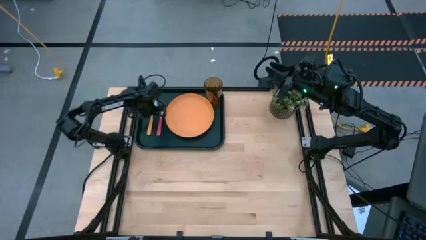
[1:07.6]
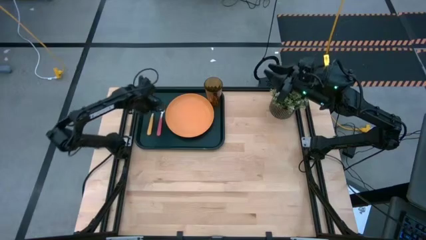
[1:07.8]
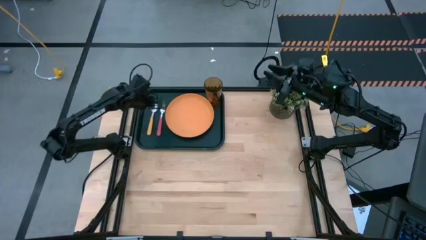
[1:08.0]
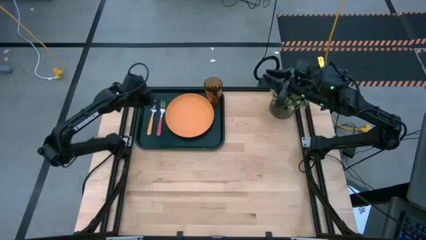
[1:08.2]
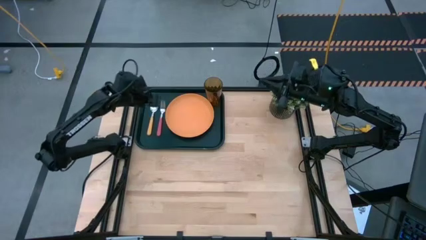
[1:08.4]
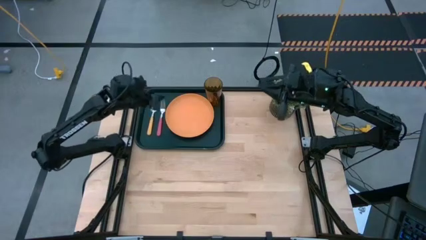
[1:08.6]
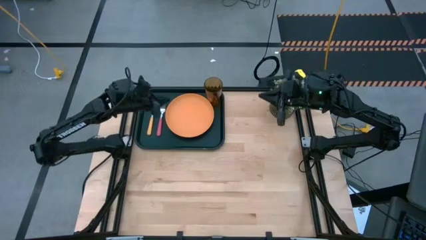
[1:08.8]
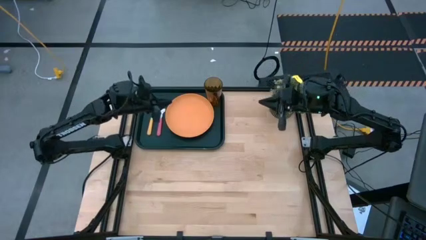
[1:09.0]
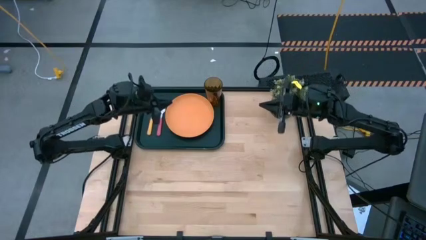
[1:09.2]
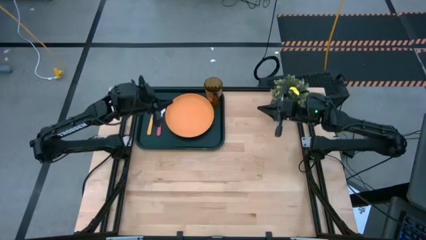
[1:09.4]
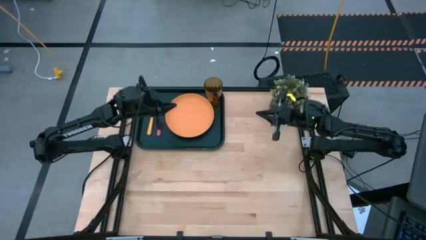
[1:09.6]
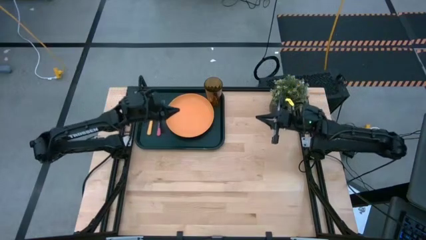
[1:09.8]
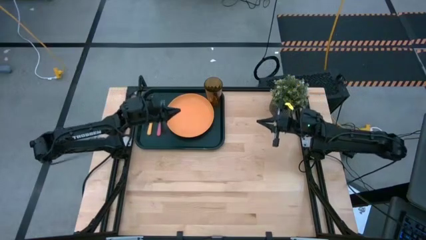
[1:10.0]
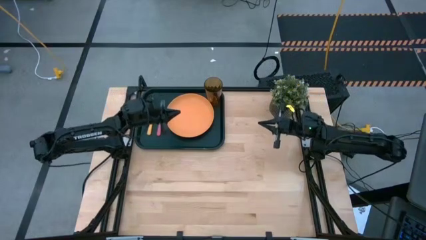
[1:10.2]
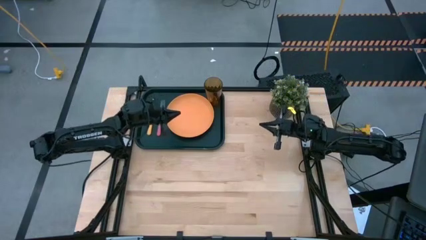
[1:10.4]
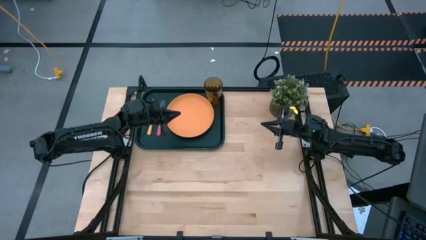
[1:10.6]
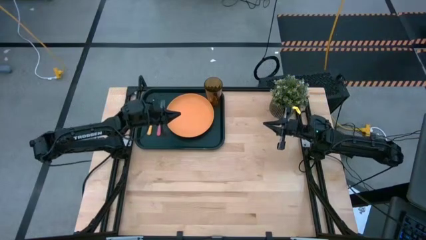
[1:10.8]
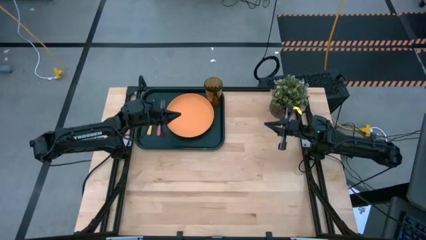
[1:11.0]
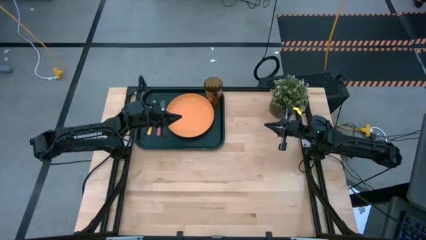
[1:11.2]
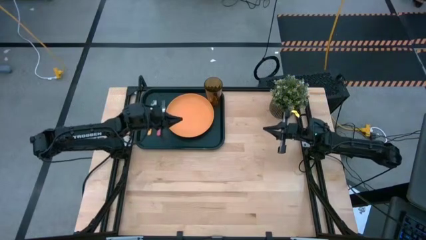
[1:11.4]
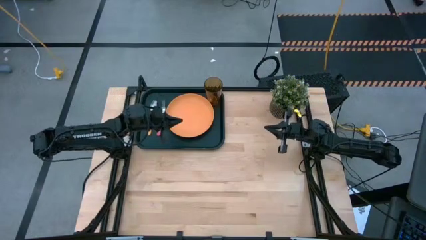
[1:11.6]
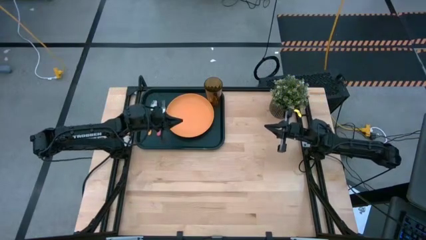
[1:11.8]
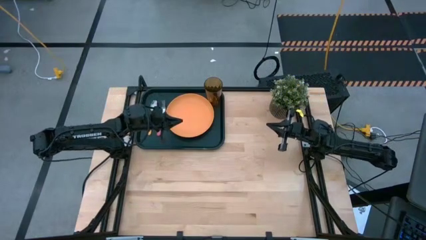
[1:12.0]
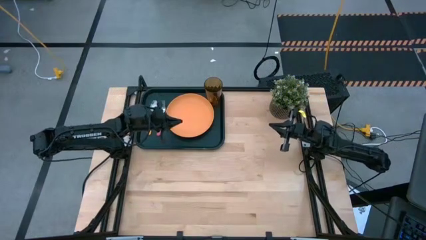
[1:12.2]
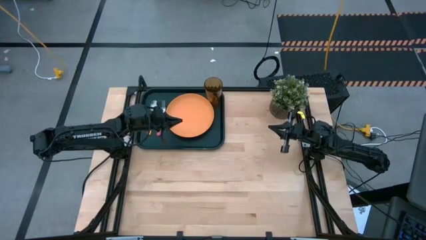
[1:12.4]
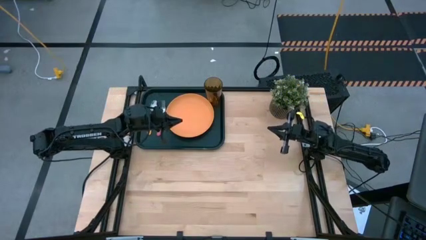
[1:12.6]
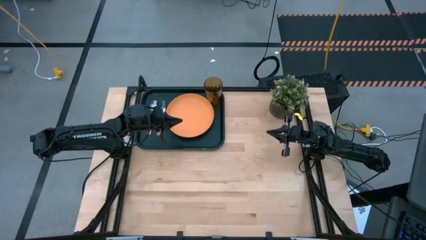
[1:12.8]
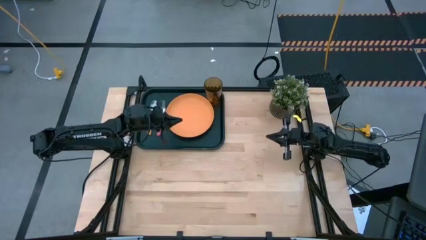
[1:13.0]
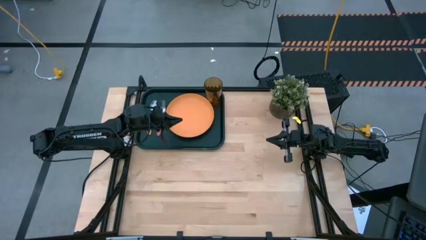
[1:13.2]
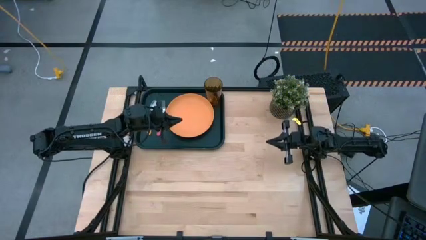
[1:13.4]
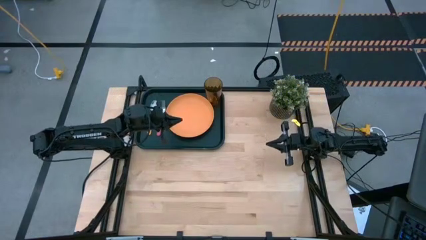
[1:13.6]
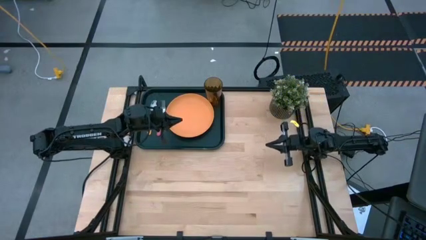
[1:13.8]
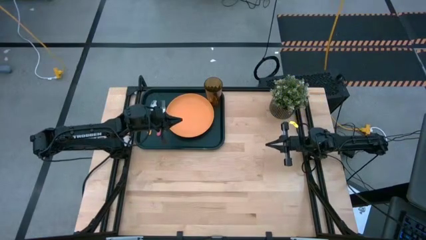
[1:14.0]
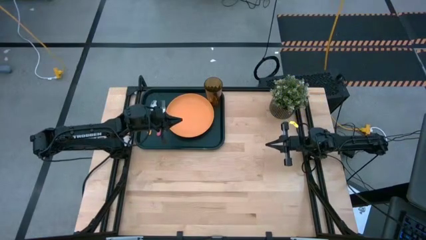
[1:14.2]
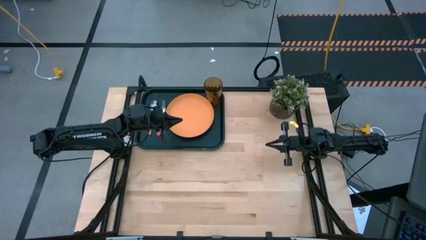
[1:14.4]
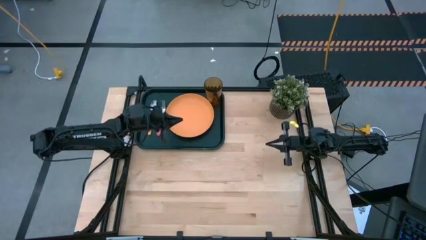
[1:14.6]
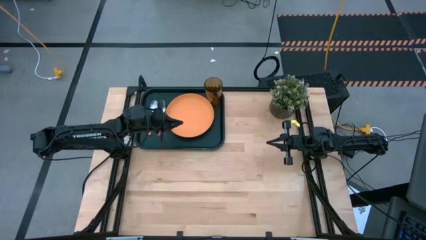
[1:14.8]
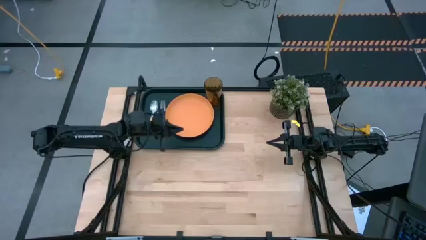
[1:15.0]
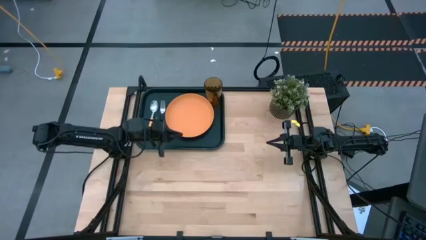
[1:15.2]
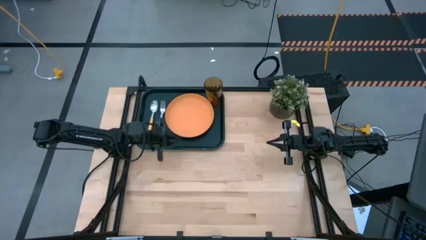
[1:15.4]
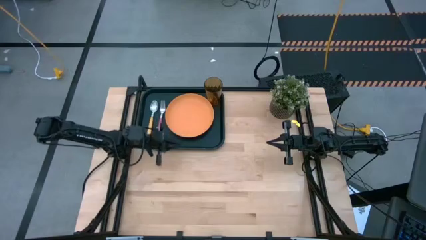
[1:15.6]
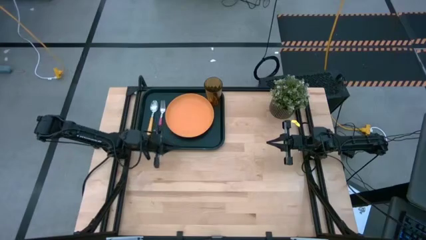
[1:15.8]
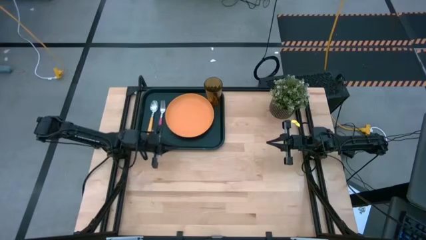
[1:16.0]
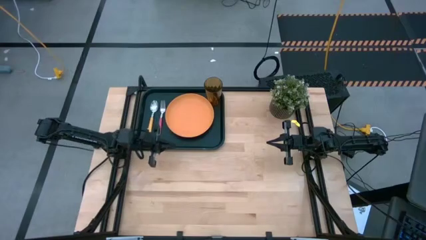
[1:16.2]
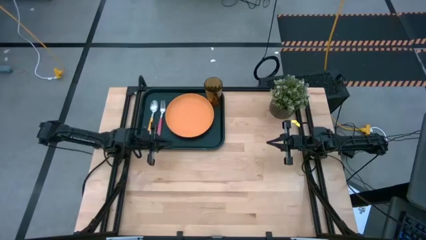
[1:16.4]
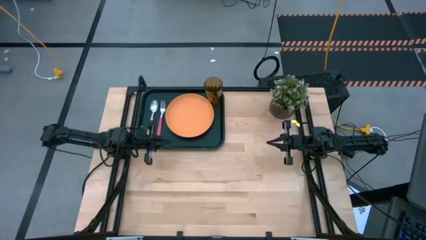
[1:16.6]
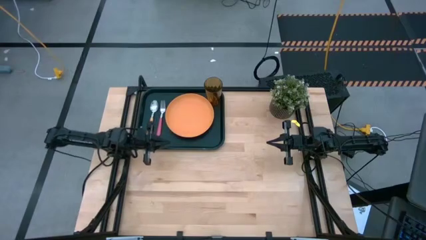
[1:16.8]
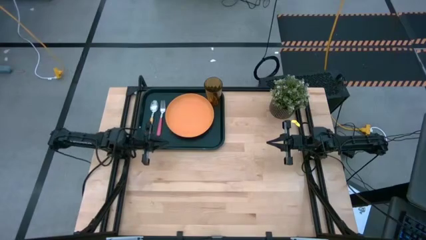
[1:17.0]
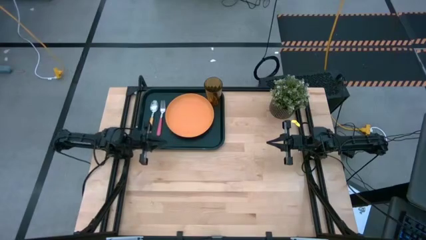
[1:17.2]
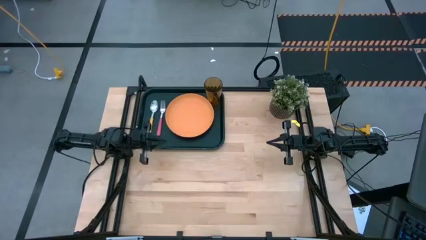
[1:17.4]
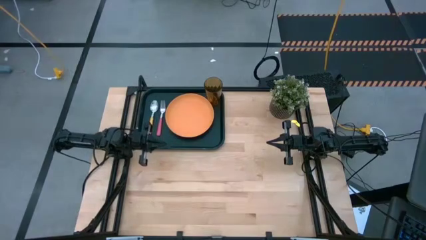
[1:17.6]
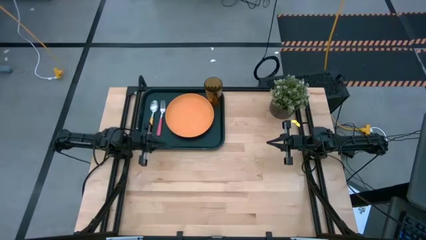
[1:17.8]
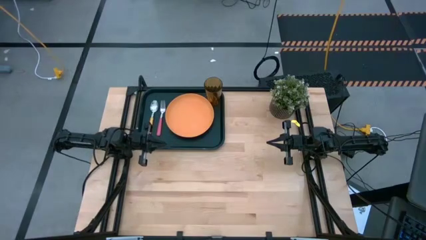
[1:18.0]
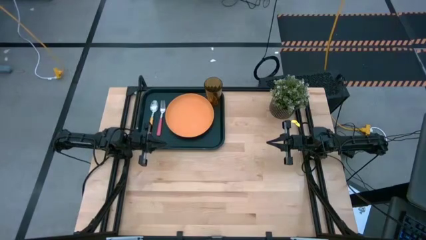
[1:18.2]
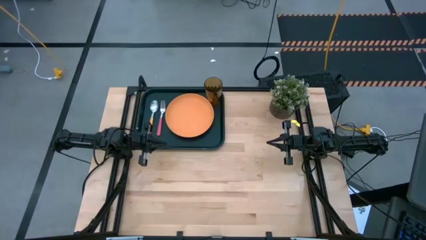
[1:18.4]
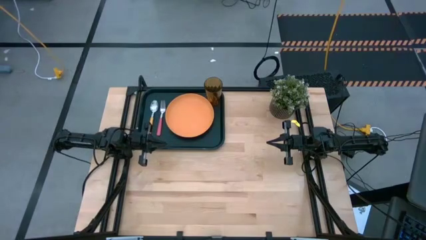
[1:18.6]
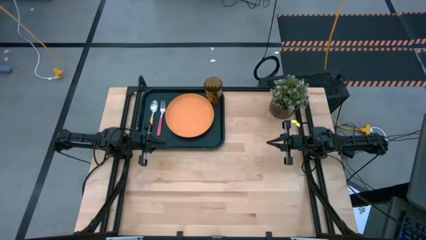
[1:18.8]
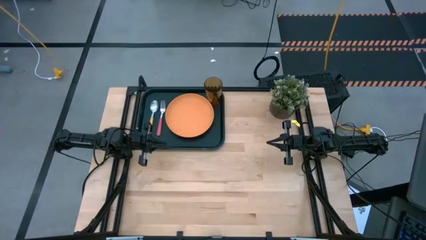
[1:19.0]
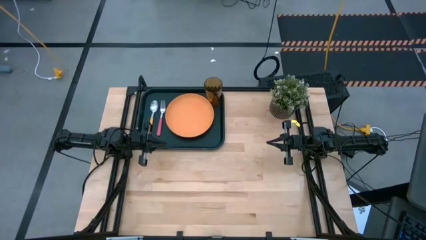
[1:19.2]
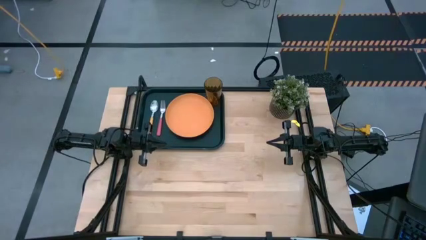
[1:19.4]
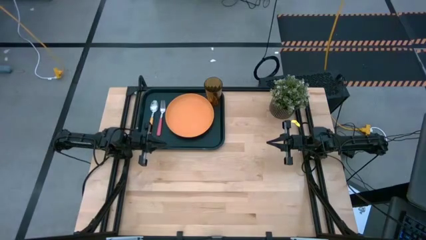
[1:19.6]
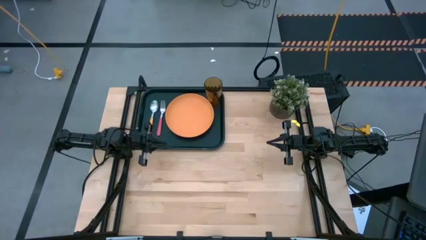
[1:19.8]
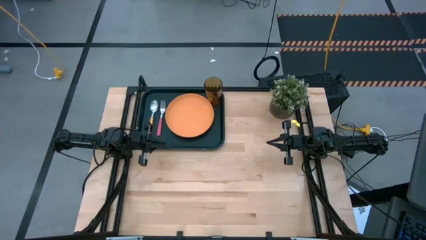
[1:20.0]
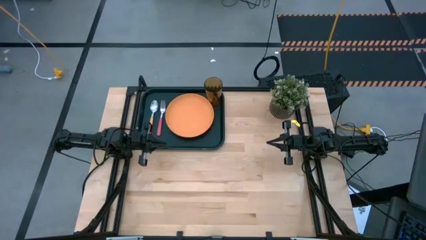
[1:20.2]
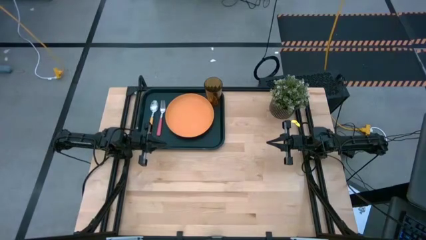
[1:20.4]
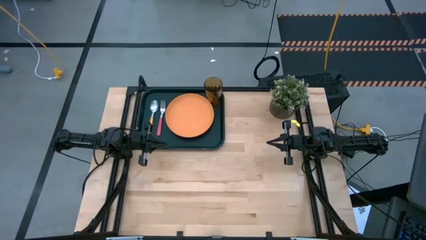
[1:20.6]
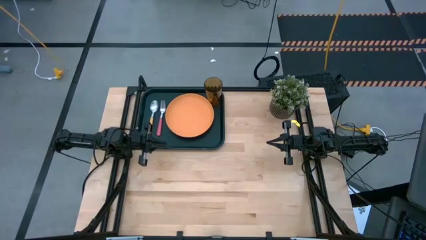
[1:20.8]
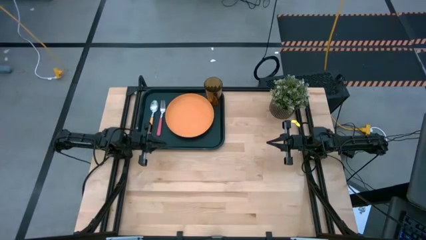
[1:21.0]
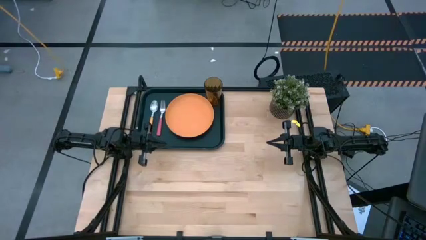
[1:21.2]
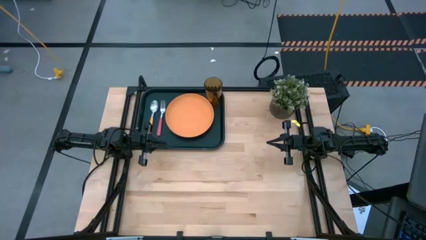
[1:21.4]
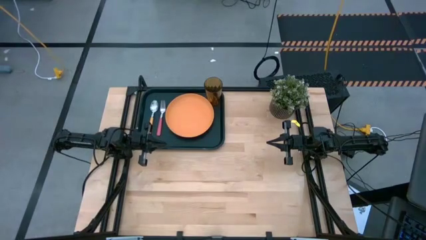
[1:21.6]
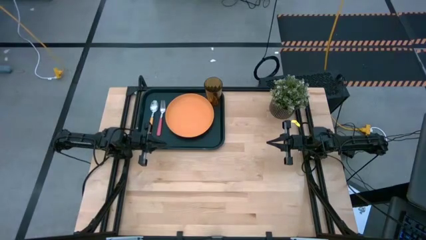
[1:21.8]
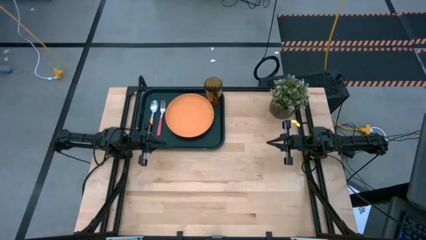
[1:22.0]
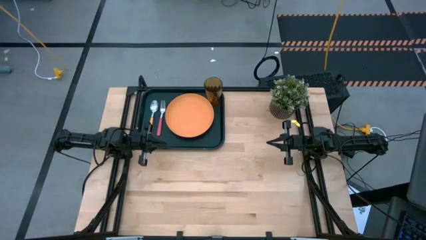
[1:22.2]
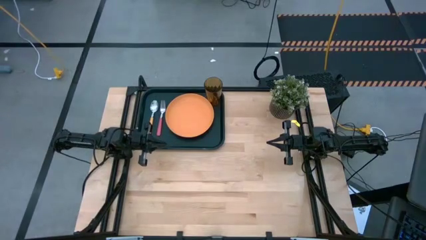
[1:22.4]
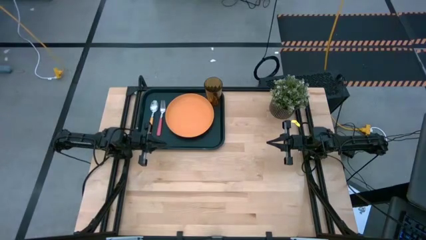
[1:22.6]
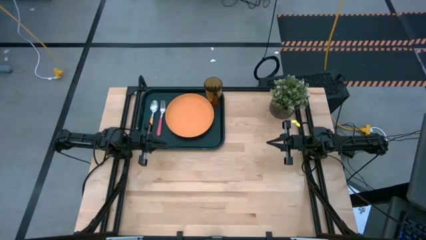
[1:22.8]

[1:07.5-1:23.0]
Task: Pick and place plate/cup/fork/spoon on tray
Return to Home Position

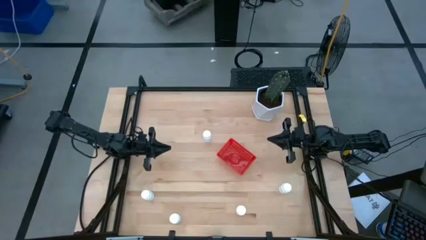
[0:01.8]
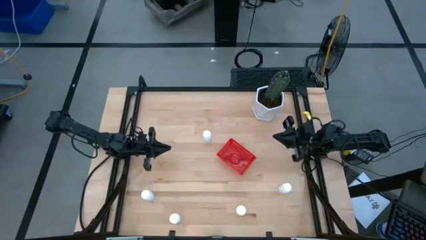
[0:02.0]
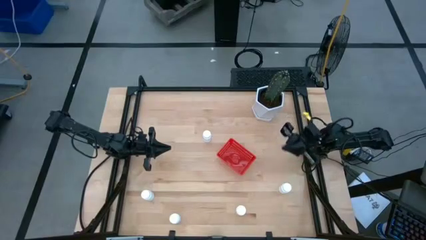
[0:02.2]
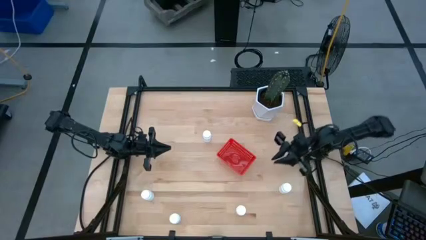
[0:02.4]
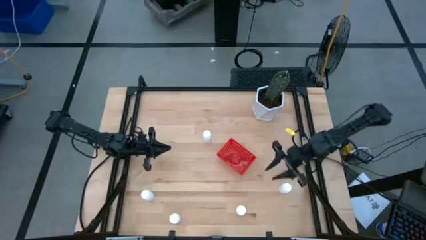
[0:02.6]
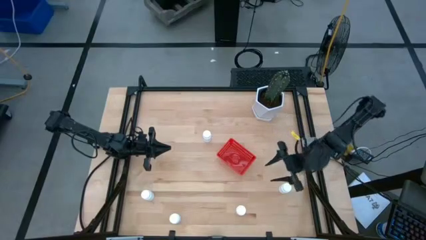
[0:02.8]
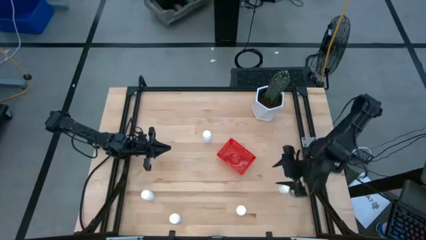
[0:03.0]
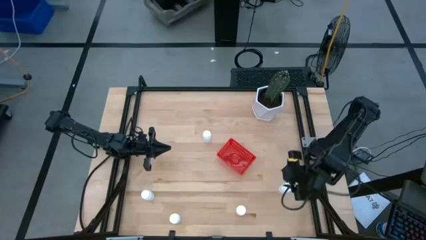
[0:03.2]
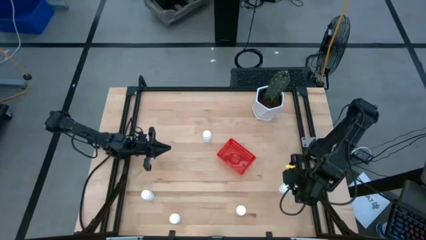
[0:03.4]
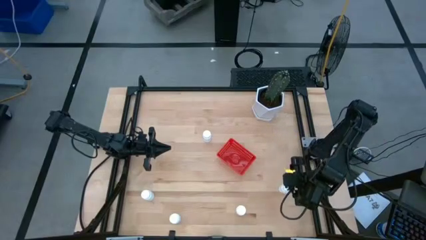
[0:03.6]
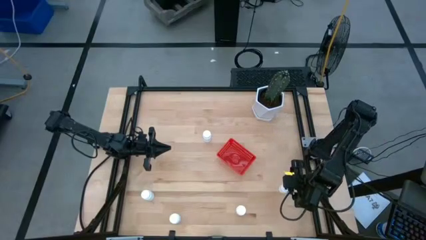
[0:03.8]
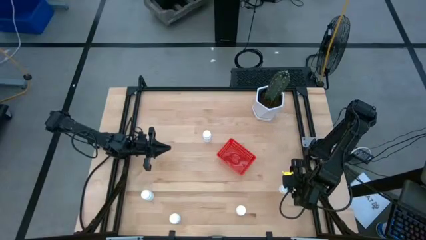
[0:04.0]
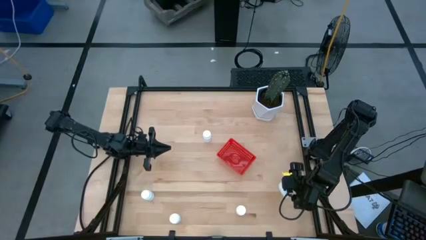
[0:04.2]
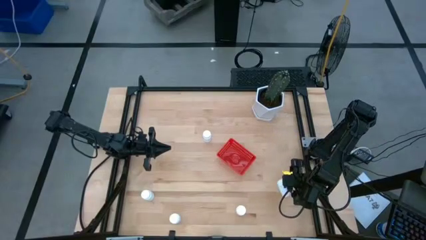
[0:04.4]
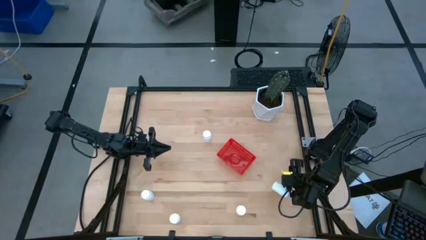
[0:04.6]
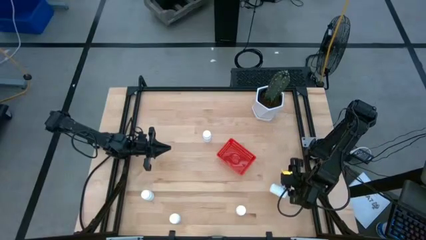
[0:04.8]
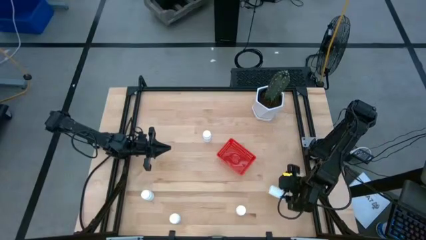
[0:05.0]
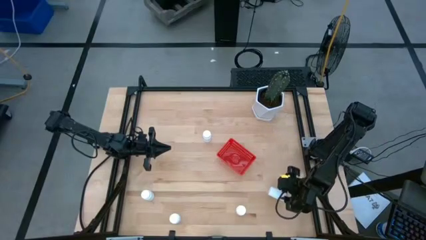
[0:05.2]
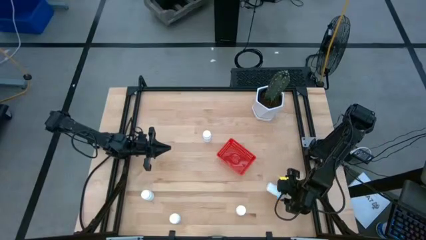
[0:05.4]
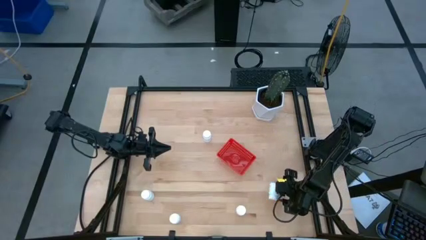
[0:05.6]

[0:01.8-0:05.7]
Task: Pick and place pill bottles into a basket
Put the white pill bottle into the red bin
